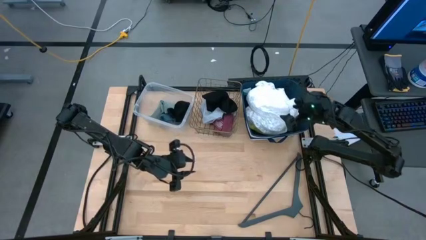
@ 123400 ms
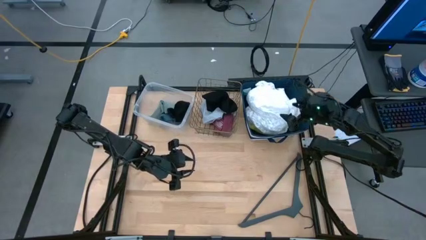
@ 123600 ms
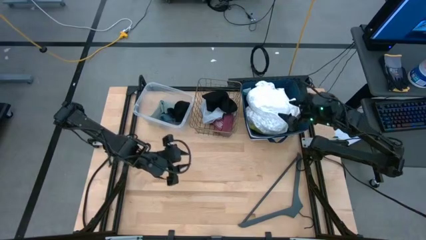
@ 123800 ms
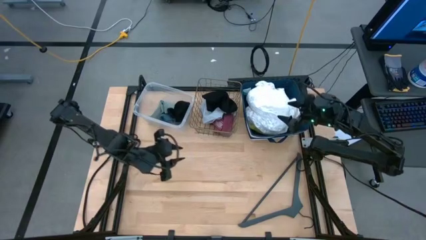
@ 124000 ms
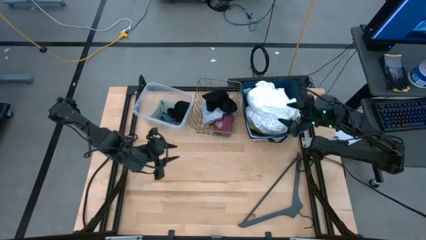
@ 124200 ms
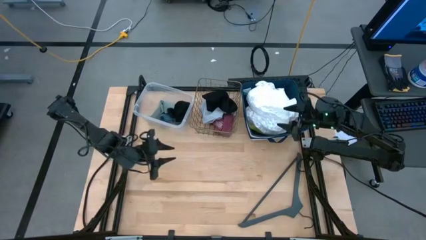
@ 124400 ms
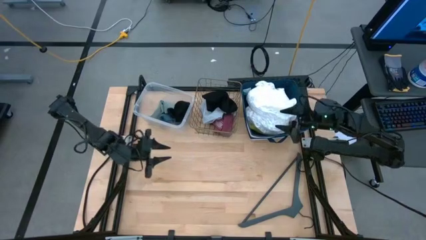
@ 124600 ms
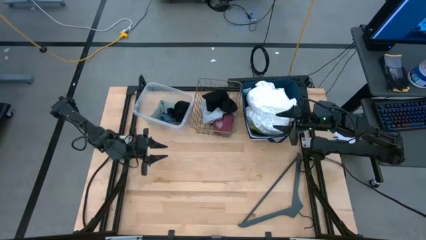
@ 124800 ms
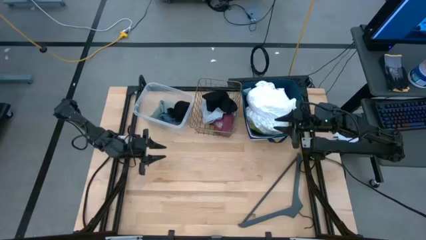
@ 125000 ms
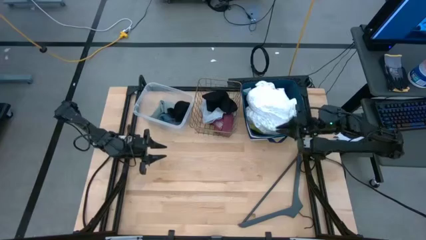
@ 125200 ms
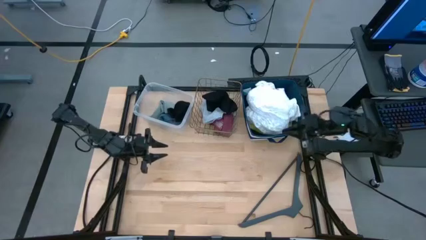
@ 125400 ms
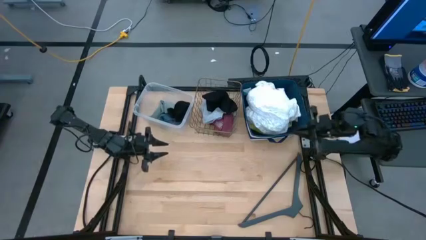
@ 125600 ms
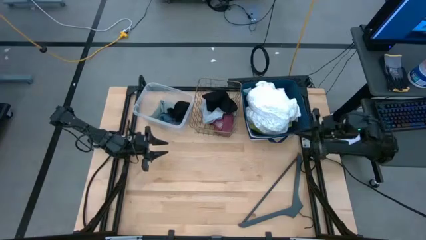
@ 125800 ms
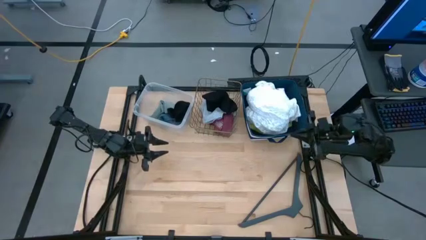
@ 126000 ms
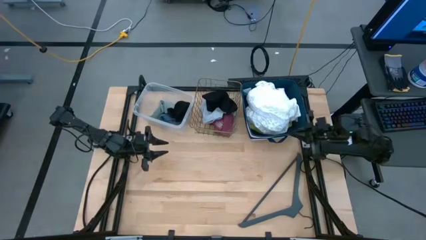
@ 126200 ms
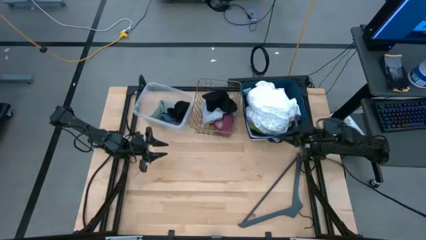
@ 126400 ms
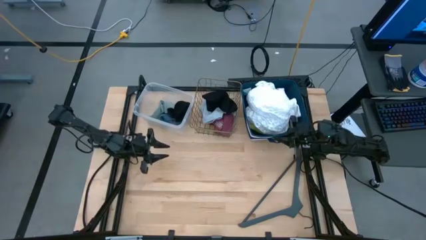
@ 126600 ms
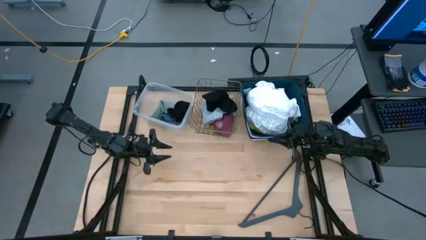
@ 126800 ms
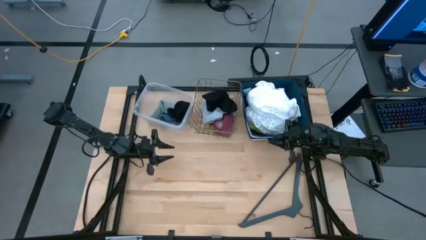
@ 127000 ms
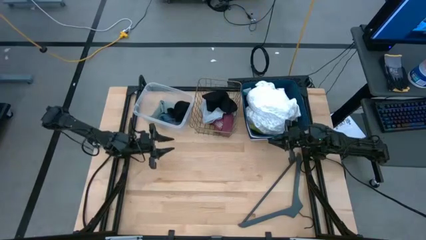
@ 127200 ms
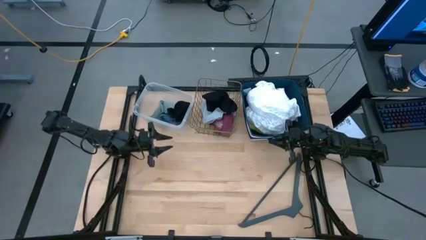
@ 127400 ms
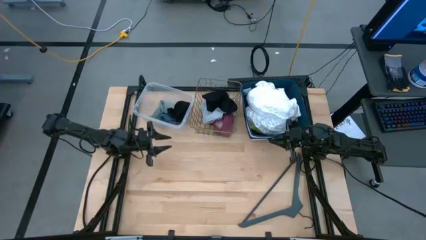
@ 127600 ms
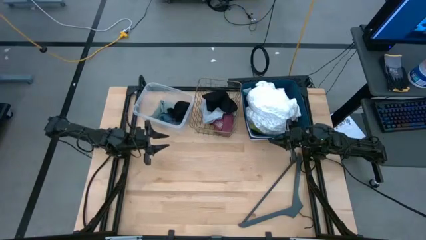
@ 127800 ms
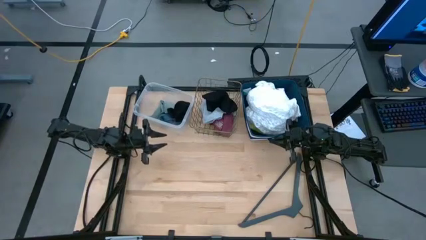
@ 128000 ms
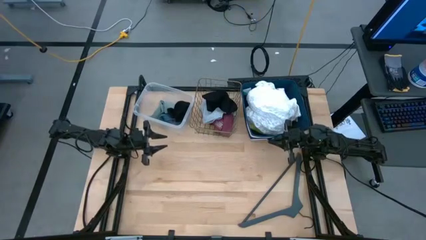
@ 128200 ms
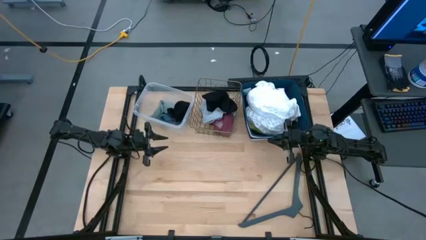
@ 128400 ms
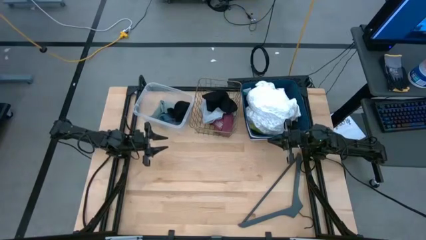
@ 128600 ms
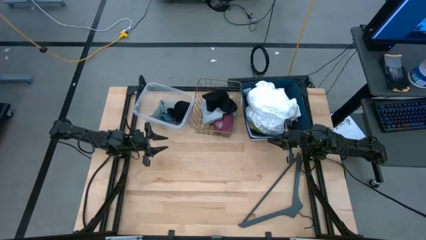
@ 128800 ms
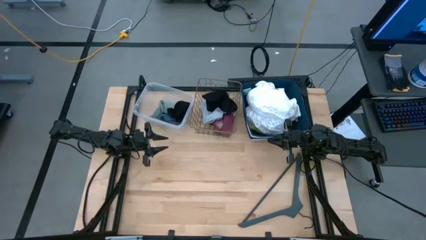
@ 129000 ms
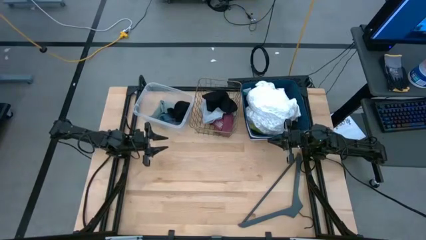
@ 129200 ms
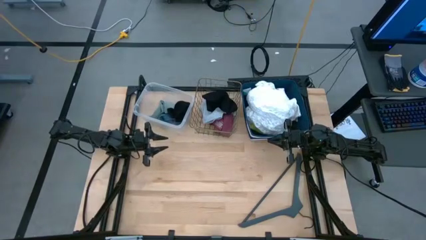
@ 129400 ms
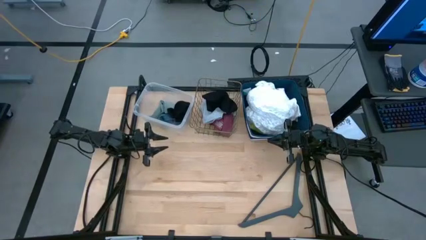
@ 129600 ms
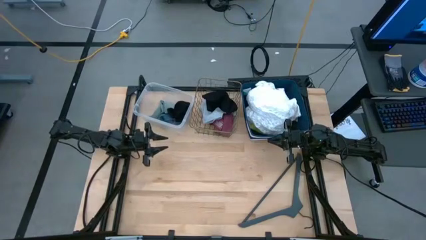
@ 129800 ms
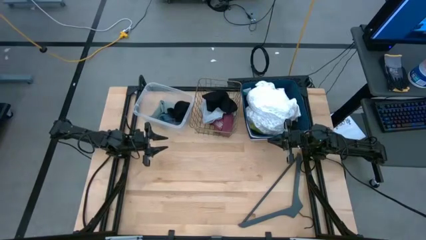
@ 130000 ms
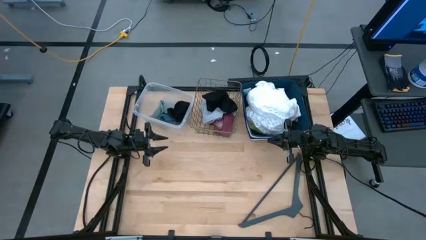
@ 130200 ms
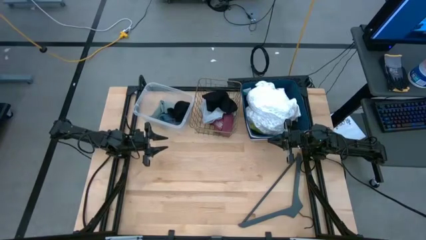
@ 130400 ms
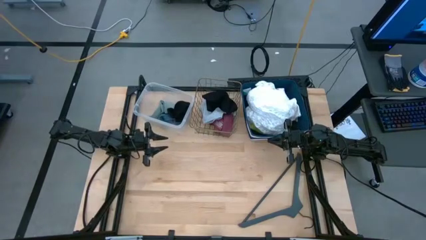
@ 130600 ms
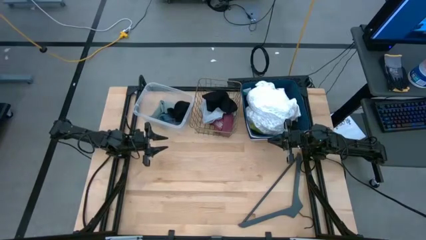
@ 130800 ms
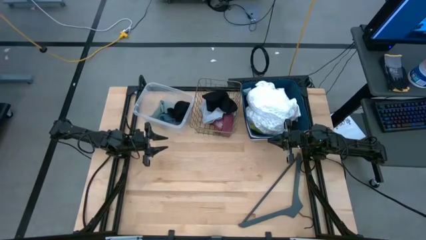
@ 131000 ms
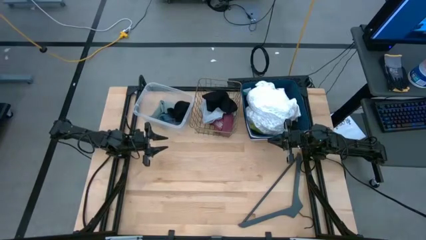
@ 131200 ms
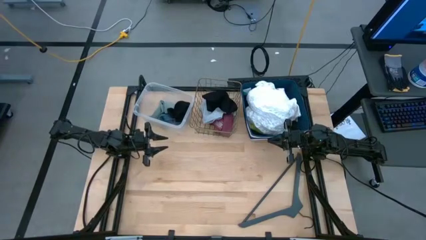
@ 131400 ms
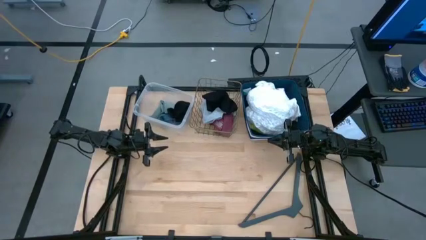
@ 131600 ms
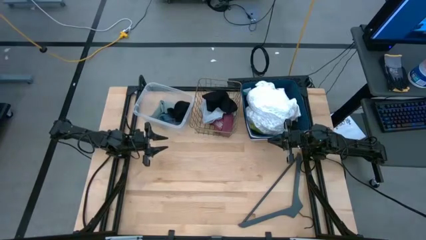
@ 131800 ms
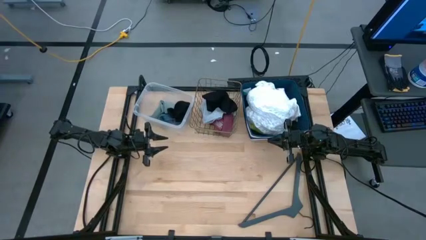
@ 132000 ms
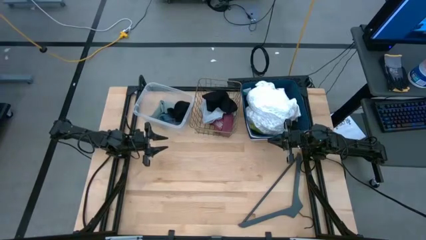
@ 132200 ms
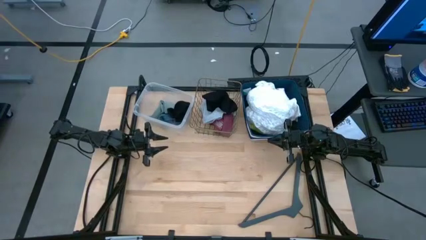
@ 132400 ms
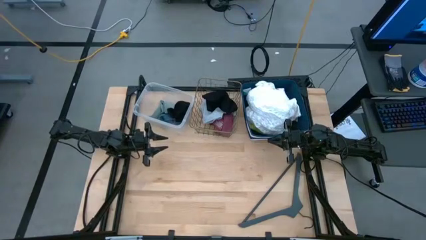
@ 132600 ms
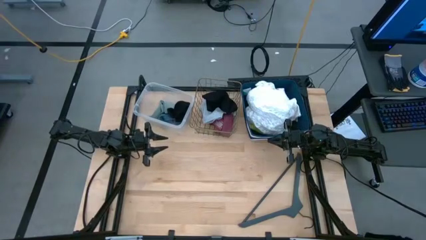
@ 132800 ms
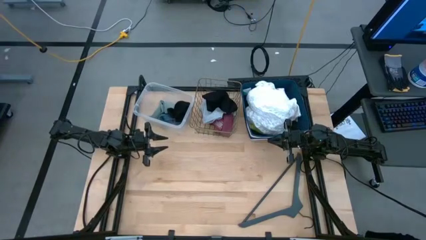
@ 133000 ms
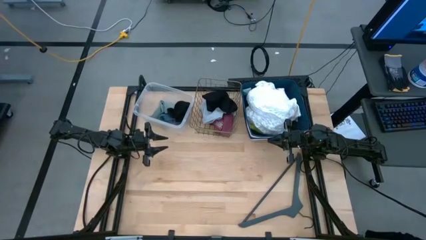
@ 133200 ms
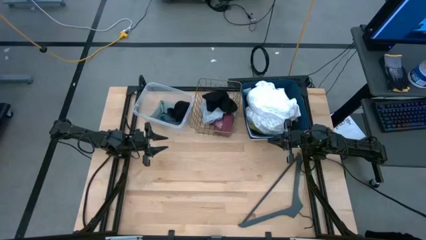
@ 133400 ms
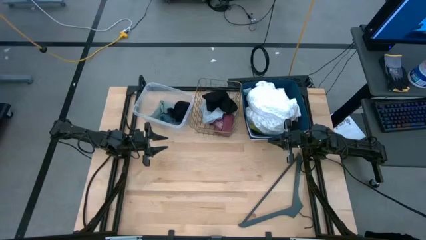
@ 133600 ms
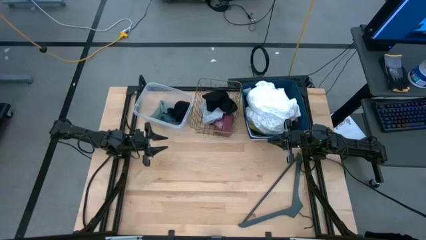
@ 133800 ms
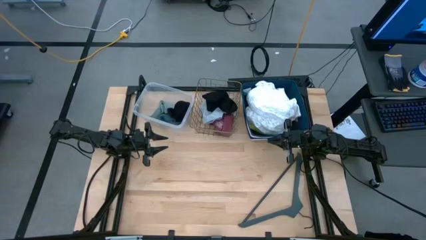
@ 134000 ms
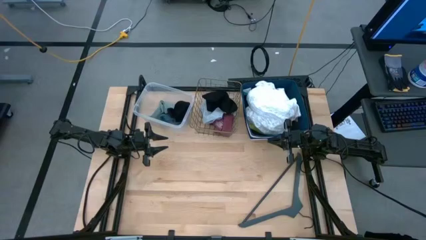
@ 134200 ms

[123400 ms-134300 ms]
Task: Pick & Place Cloths
Return to Home Position

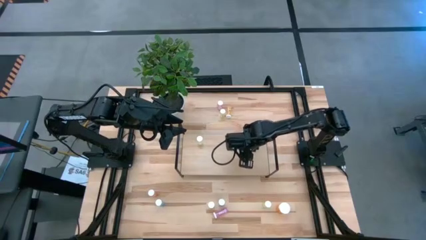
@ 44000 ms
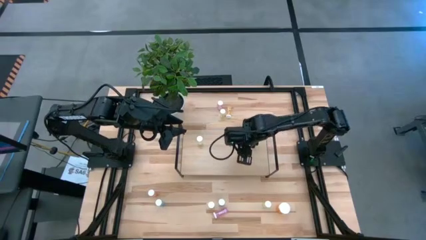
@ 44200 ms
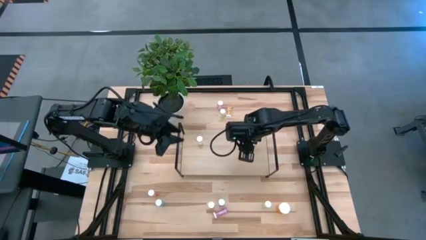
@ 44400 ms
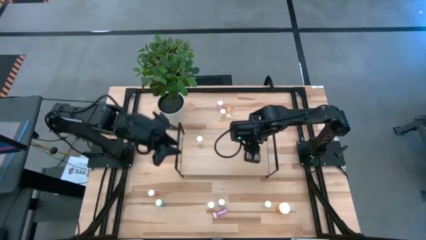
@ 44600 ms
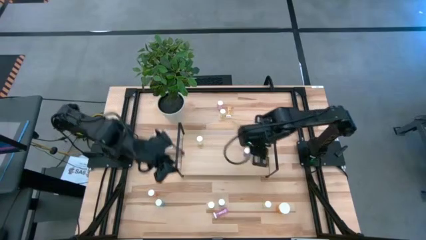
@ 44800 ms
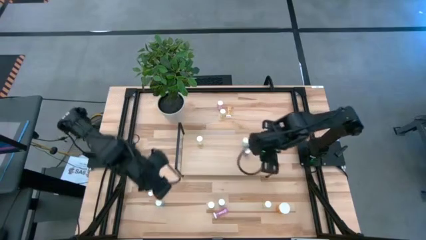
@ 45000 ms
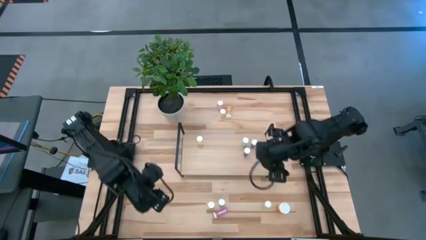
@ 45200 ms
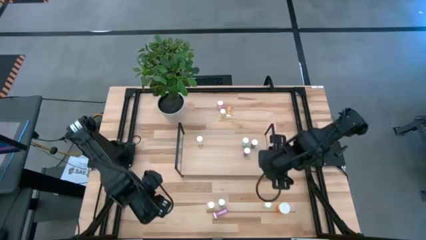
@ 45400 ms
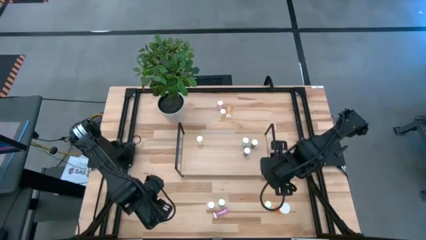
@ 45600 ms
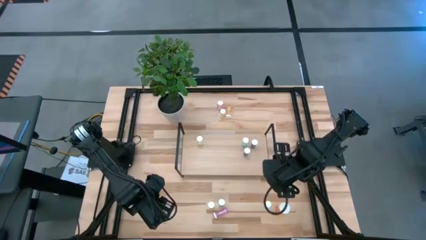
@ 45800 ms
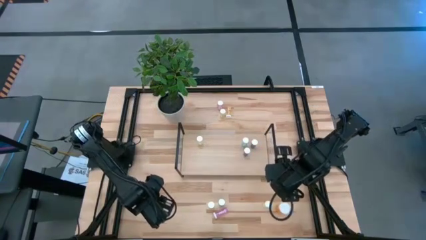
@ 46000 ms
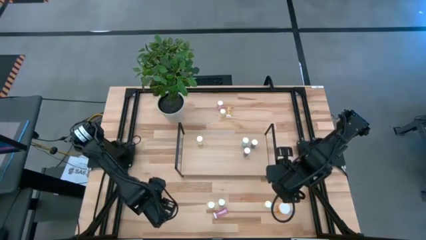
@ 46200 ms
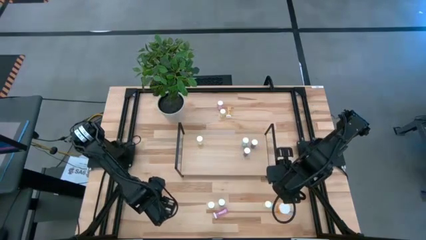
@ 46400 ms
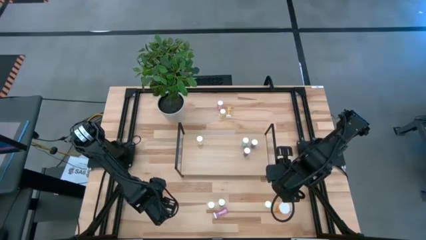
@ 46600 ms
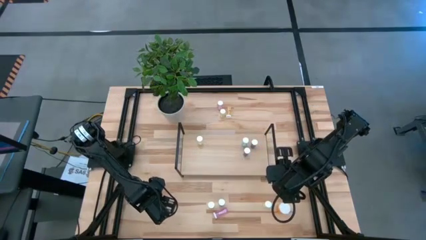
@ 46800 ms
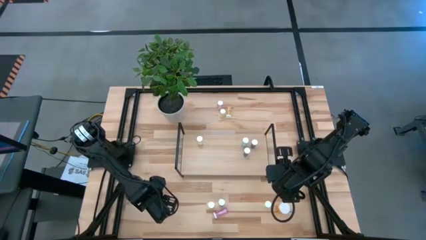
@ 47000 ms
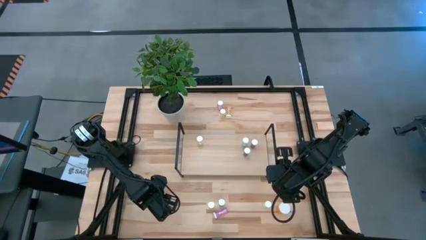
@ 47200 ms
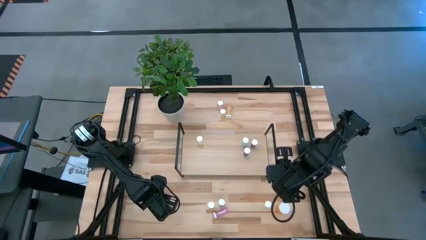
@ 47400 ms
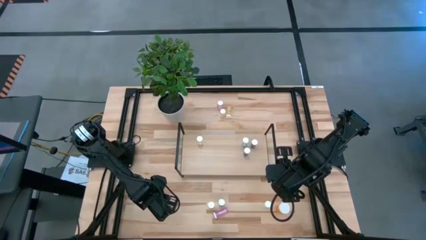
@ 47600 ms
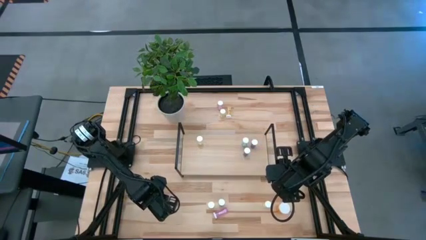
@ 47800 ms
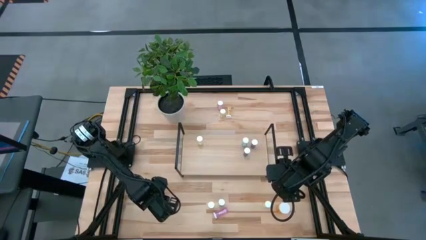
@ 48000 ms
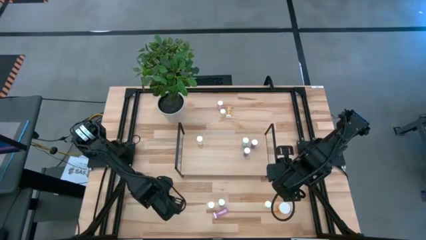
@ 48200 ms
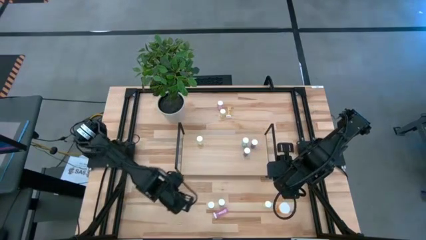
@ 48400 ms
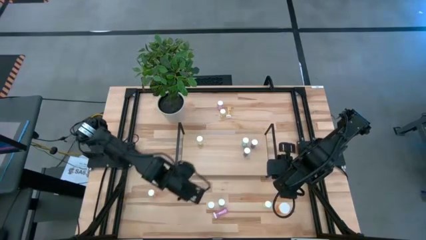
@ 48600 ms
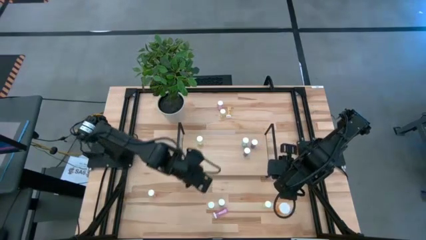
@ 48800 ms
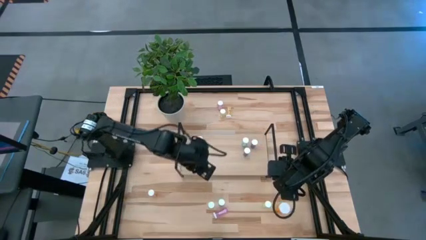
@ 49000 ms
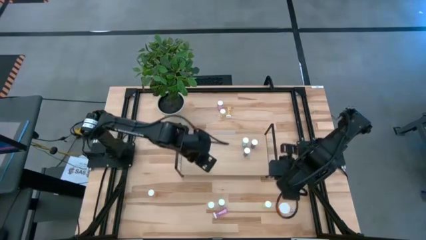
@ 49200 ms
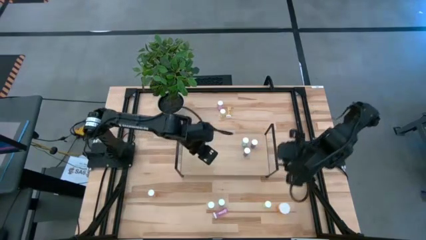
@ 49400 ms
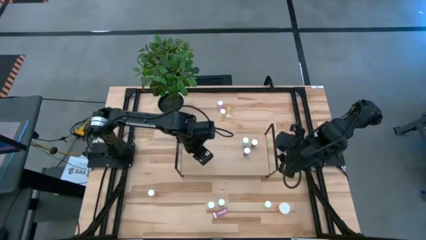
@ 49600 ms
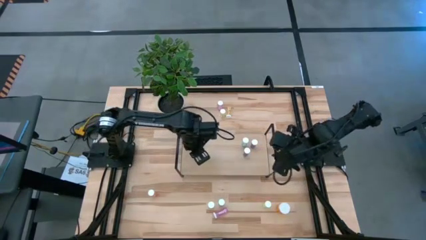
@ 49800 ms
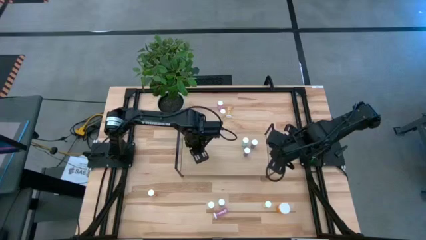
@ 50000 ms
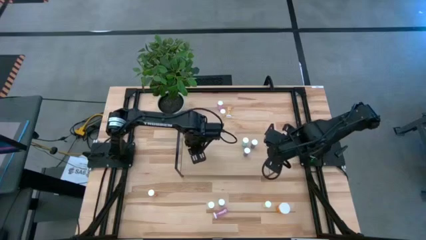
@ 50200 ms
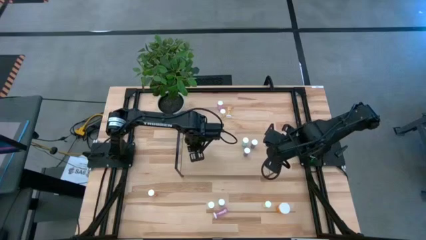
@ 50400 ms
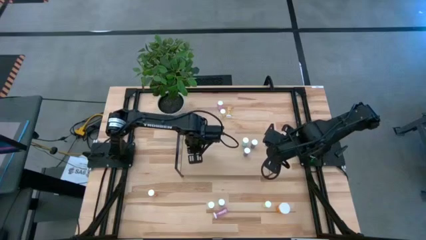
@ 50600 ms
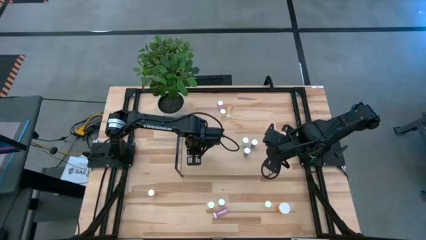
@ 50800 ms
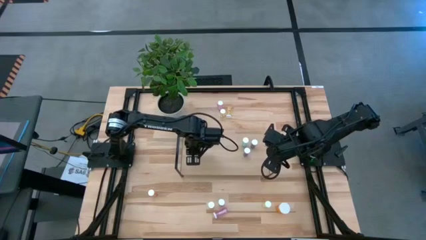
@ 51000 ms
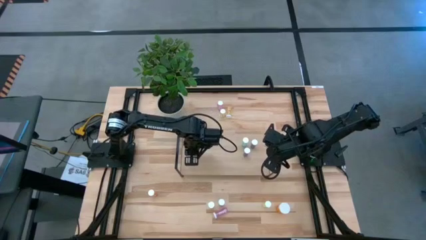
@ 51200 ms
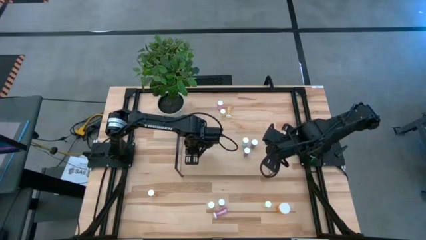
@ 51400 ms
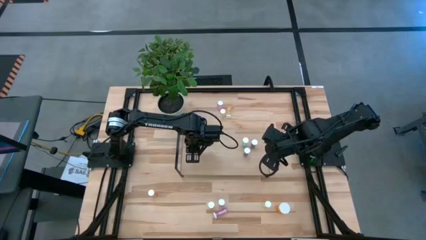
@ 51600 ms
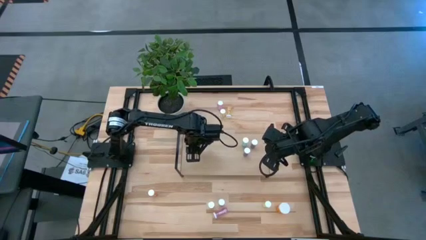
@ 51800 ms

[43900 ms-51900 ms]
Task: Pick and place medicine bottles onto shelf by color
Put the blue pill bottle on the shelf
